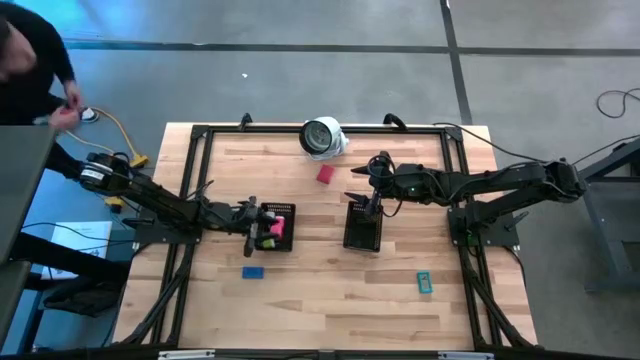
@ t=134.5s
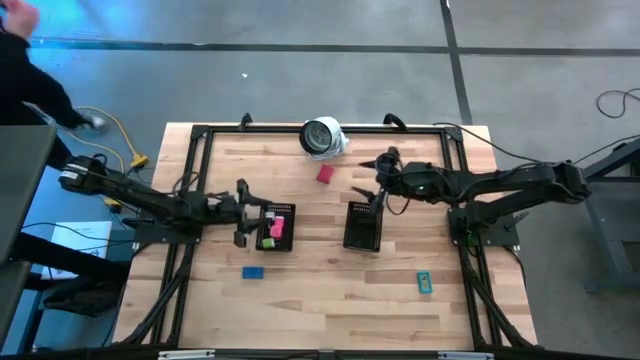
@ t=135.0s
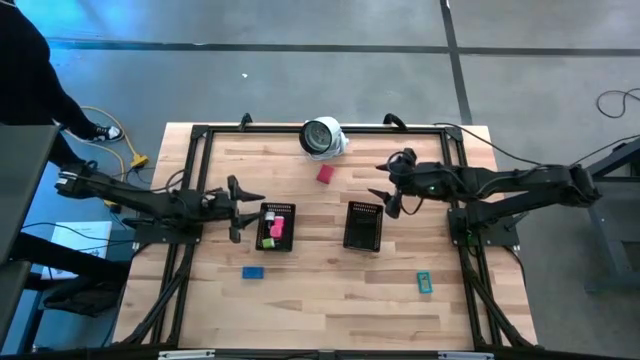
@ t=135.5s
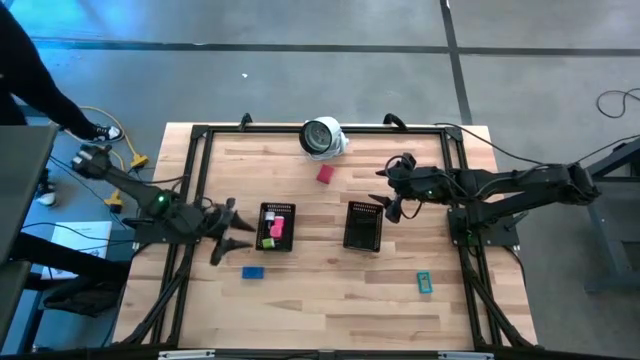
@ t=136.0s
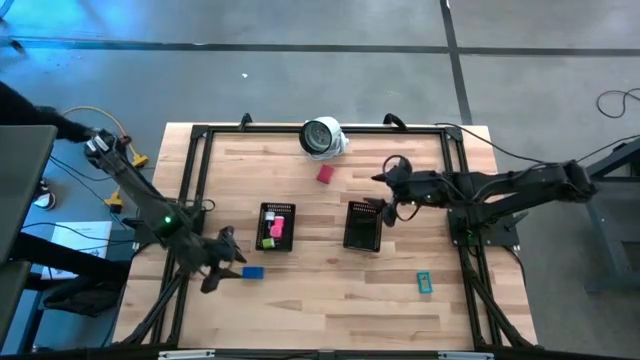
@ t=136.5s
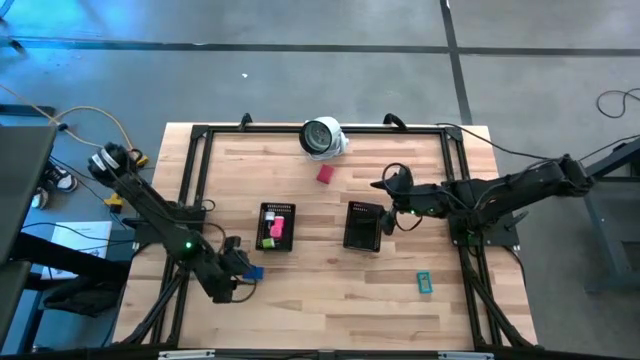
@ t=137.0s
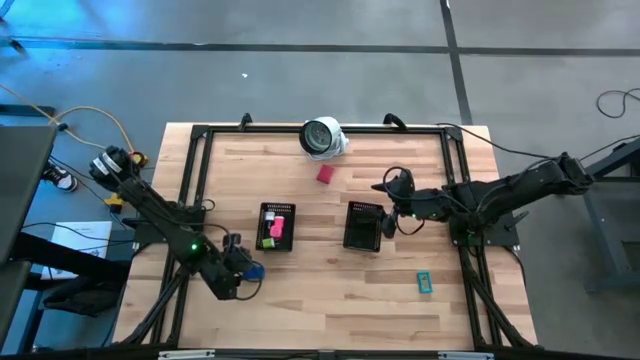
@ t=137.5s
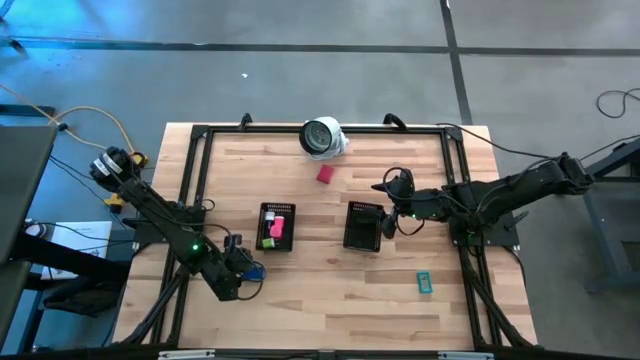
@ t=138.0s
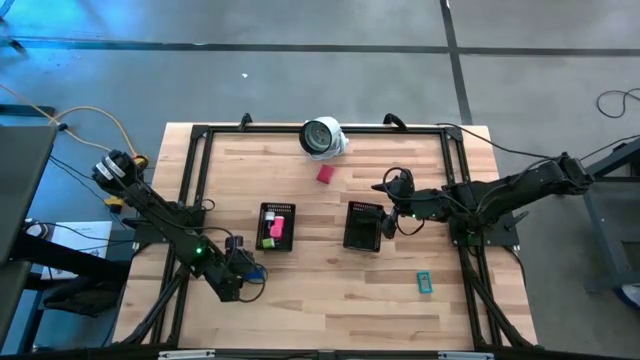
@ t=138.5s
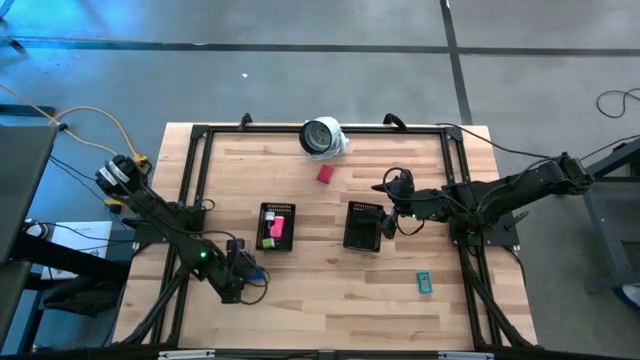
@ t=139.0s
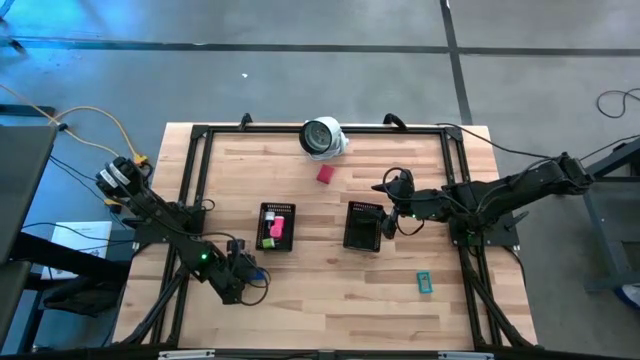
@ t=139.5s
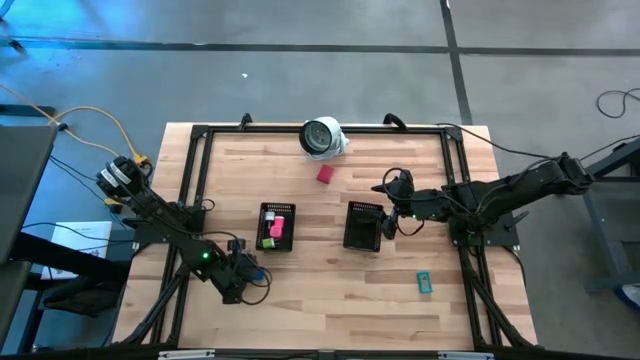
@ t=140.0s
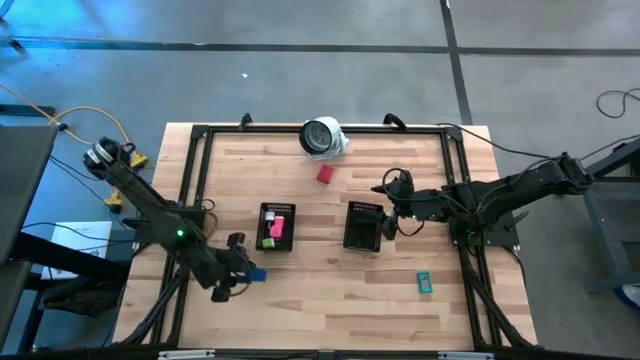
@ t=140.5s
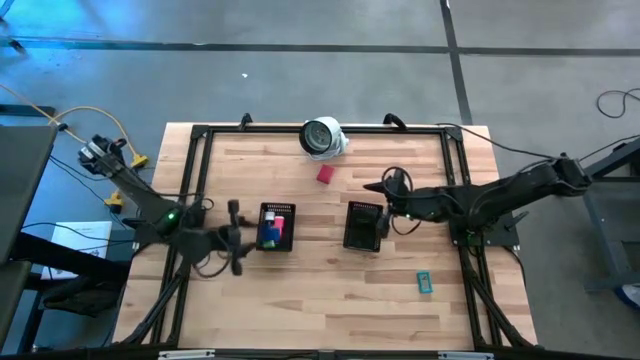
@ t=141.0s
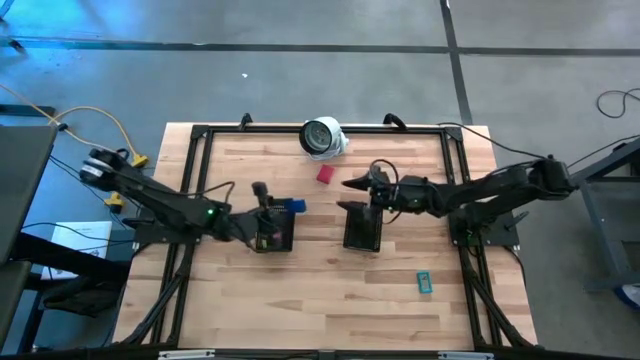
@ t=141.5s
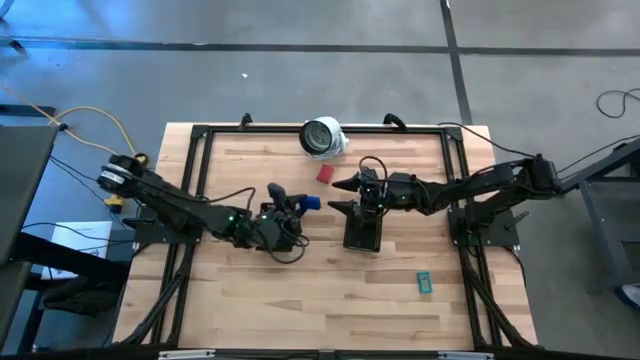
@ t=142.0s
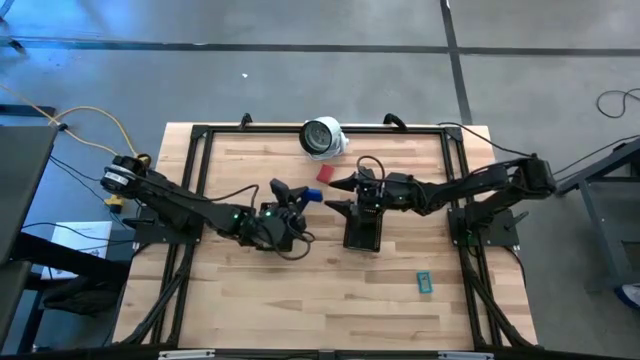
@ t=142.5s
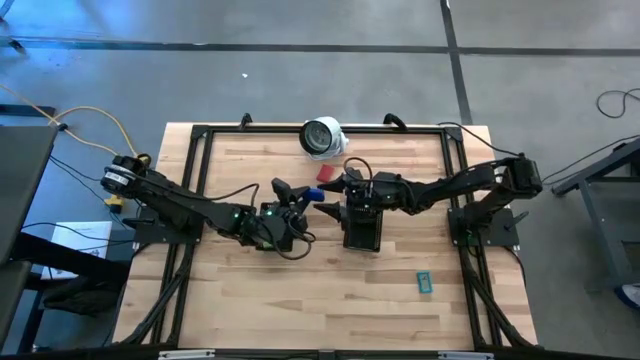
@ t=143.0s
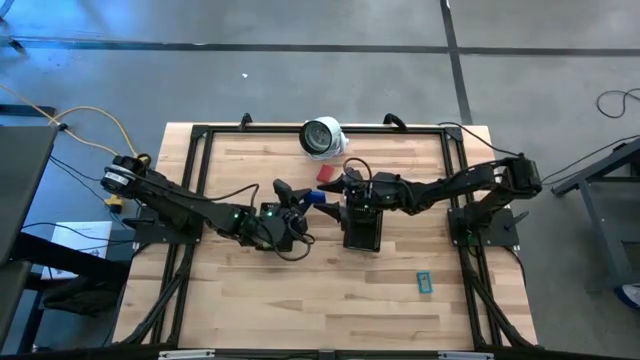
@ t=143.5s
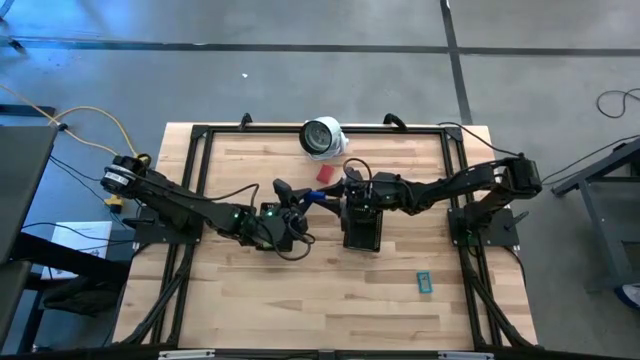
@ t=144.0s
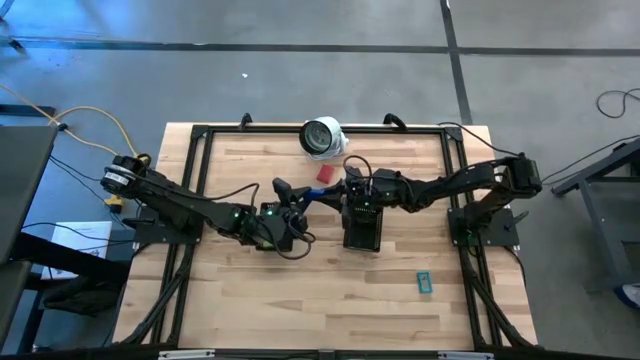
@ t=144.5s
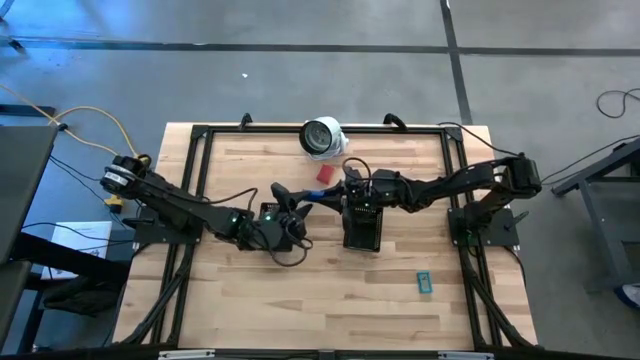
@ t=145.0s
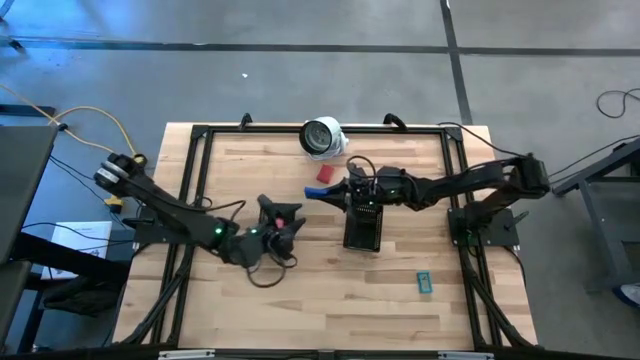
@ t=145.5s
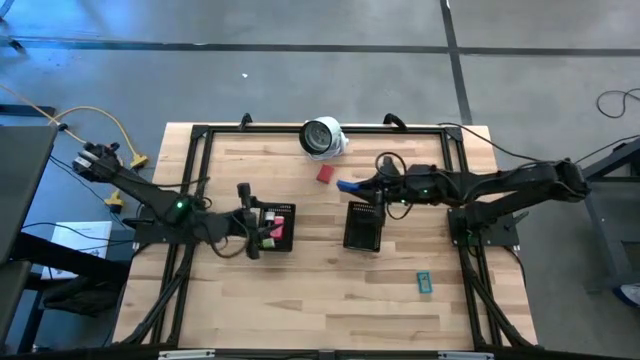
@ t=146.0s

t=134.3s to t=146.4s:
Task: Pick & Place Office items
Put the blue digital clock into the right black bin

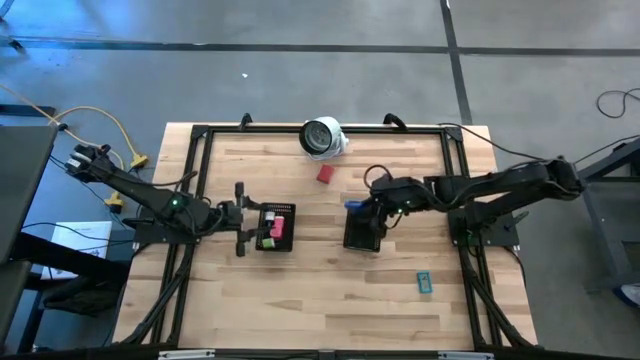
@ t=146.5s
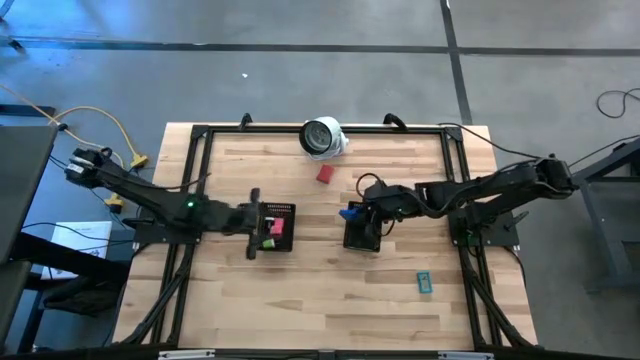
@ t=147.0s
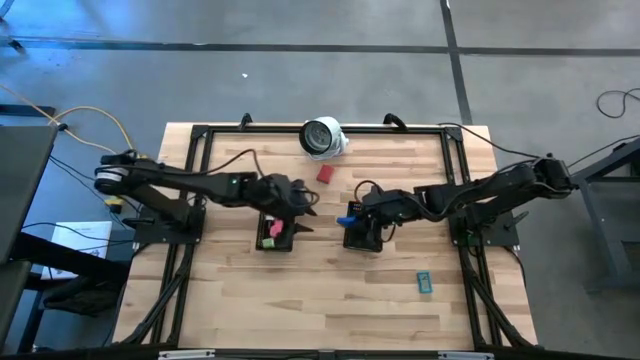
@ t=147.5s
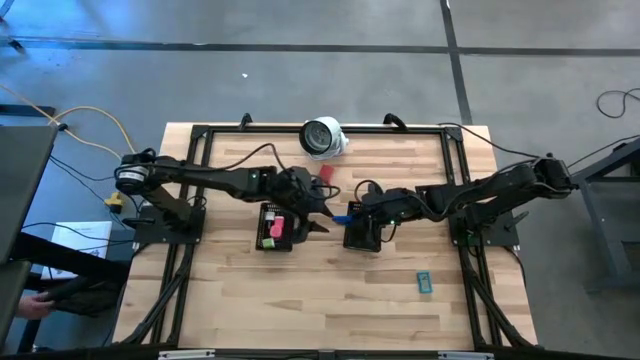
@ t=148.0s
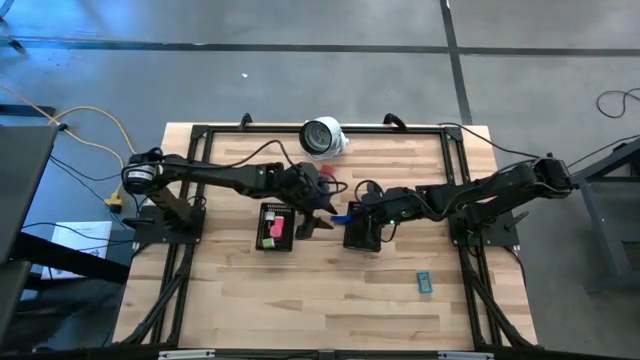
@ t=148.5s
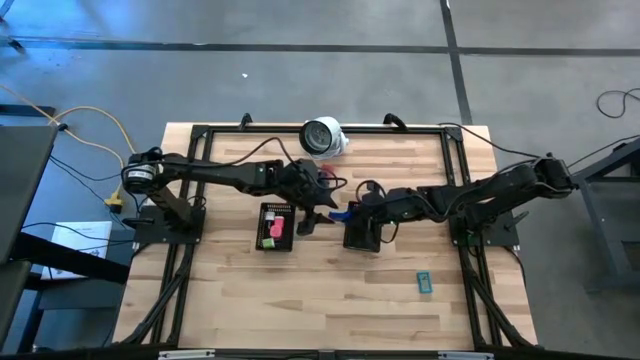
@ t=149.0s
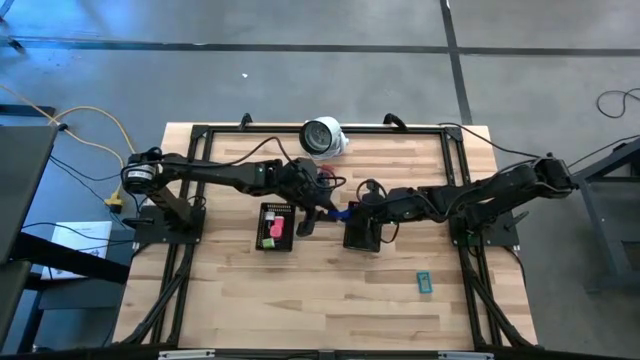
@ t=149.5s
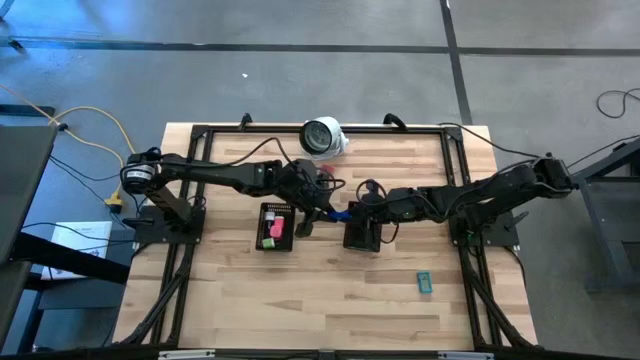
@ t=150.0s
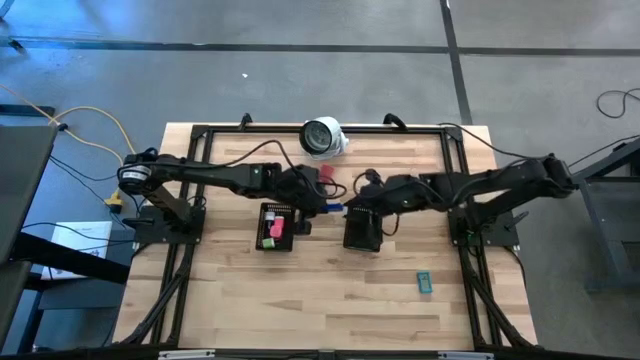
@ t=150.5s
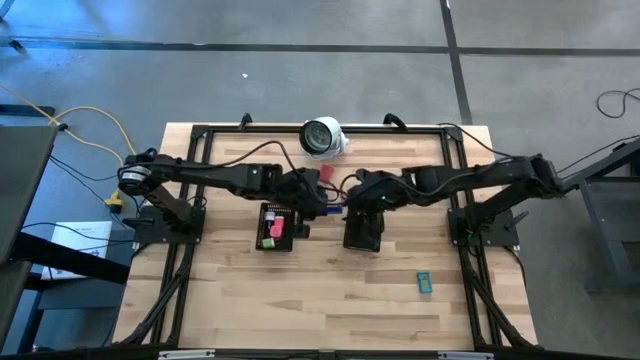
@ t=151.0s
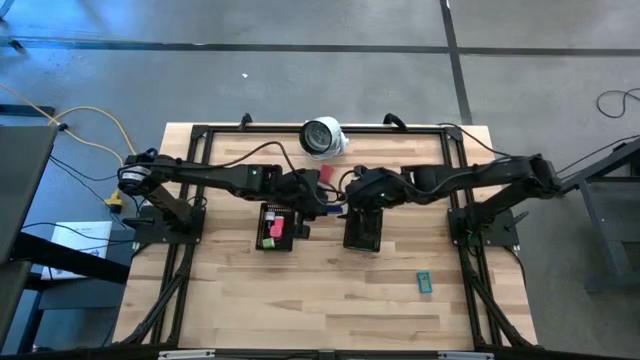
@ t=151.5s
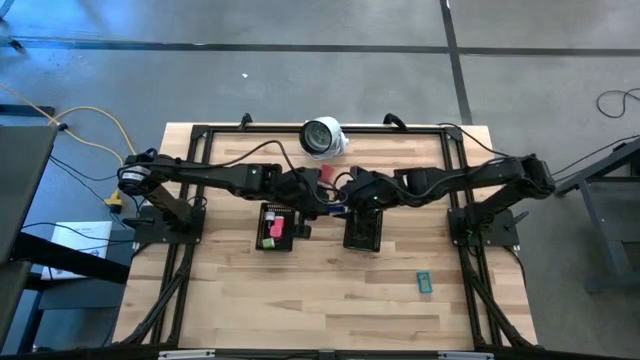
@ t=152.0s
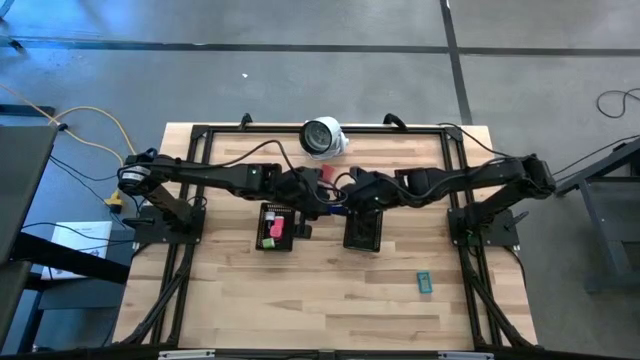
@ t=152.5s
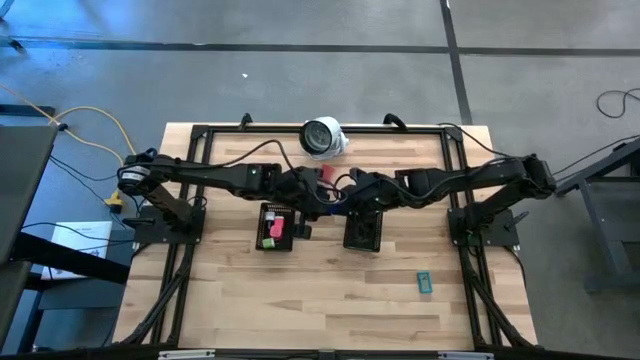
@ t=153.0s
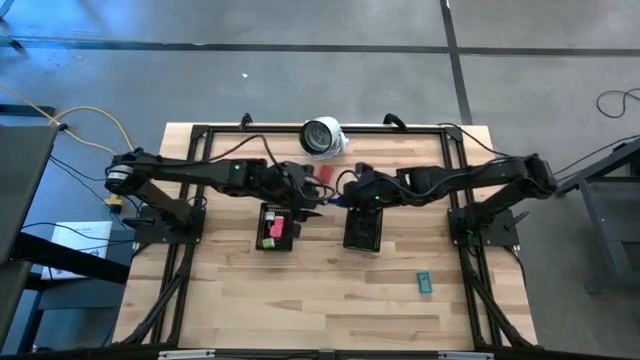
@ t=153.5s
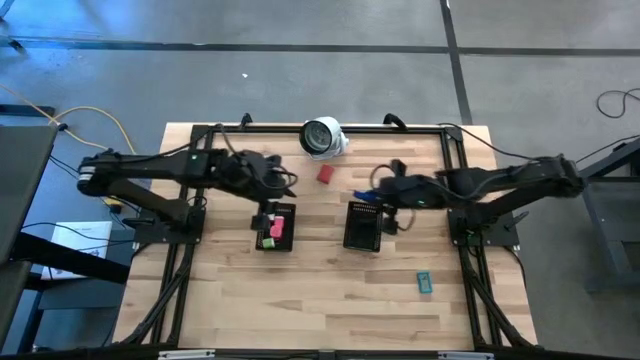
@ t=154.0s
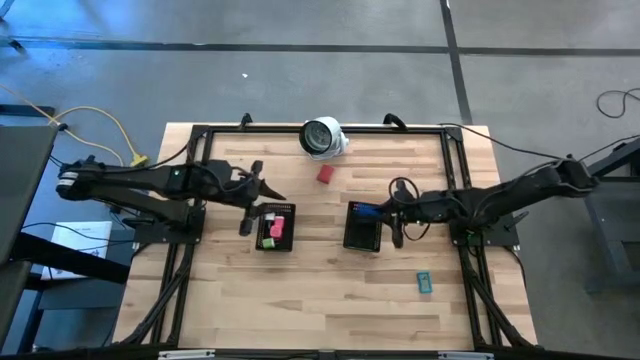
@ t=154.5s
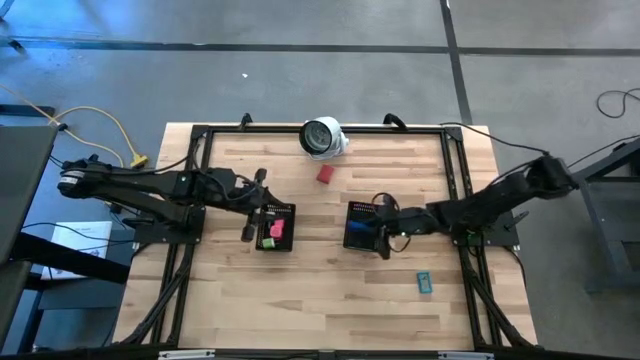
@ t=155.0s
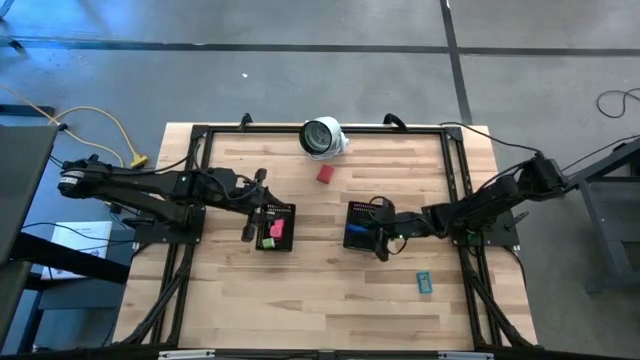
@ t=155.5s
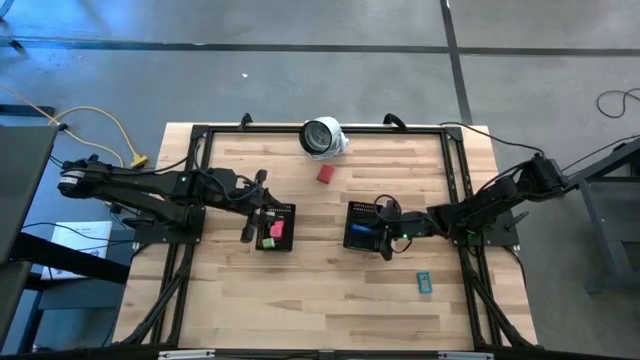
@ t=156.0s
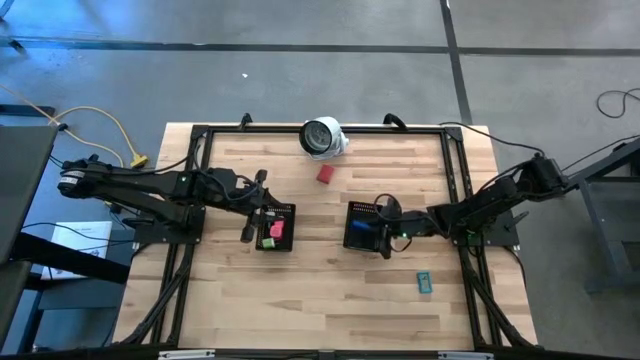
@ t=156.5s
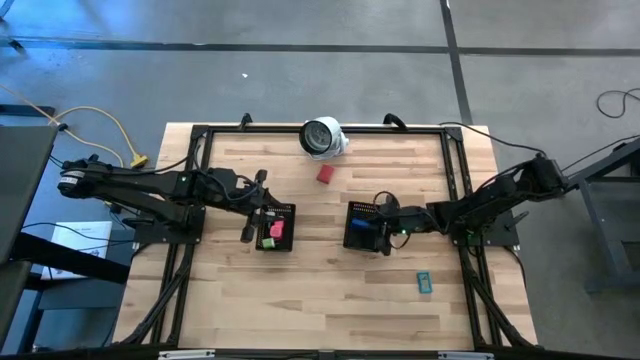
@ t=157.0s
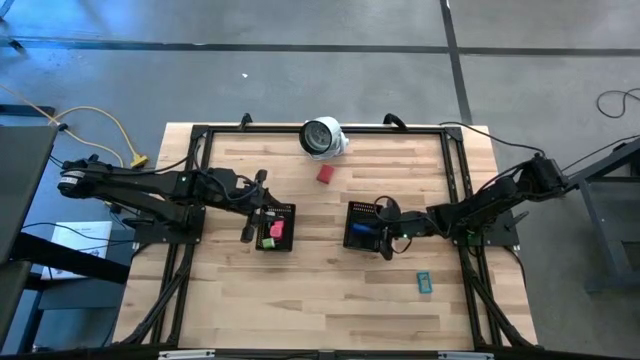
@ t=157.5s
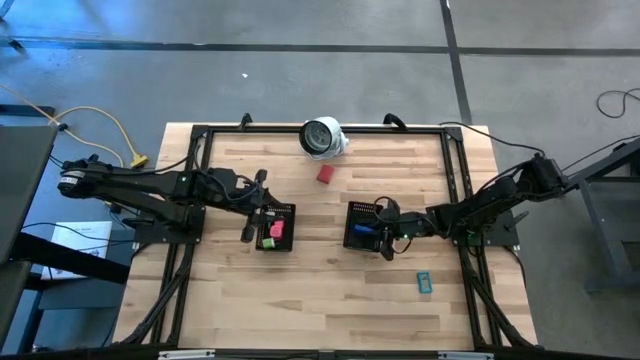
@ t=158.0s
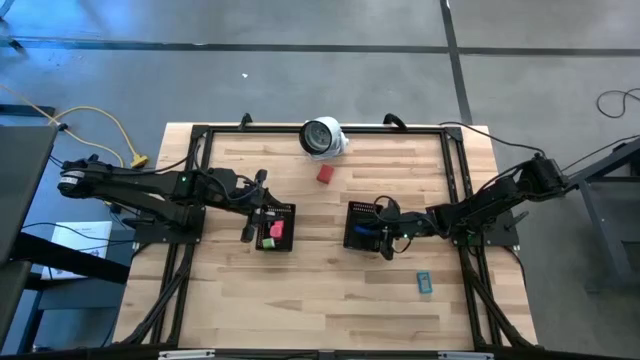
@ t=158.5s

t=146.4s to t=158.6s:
Put the blue digital clock into the right black bin
